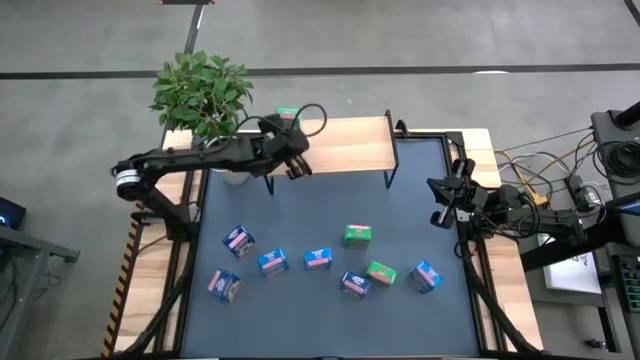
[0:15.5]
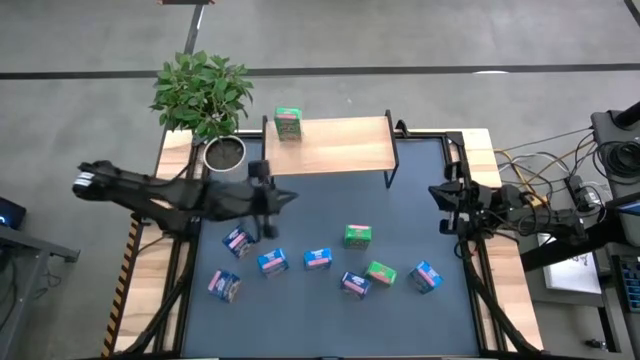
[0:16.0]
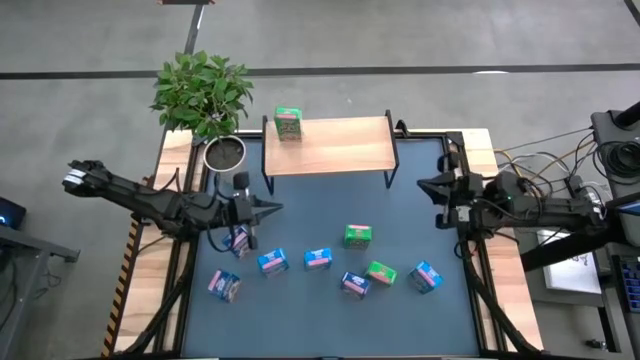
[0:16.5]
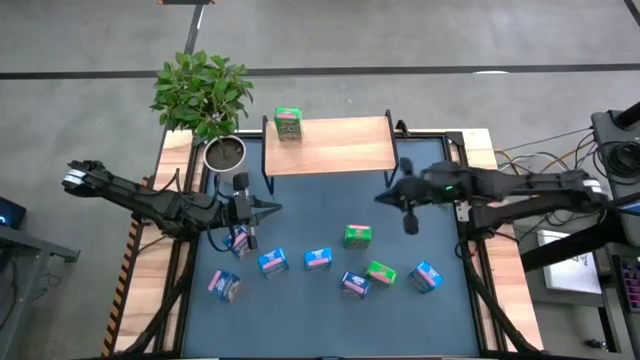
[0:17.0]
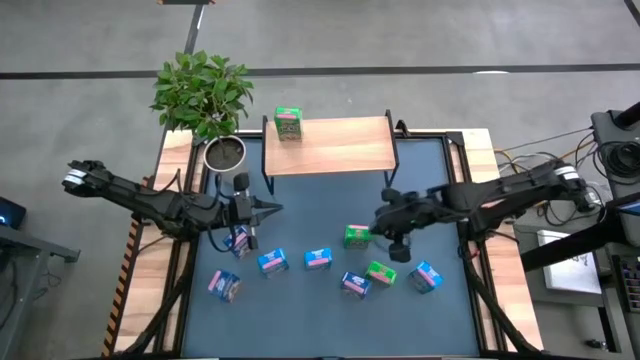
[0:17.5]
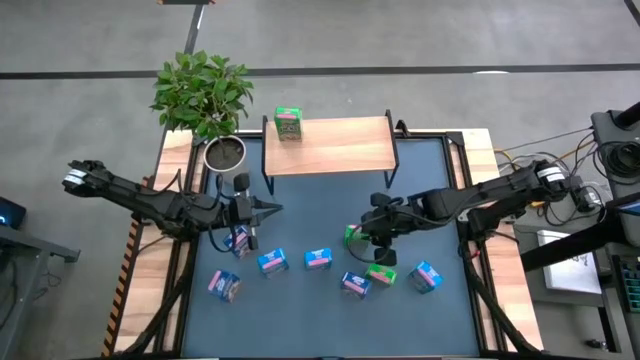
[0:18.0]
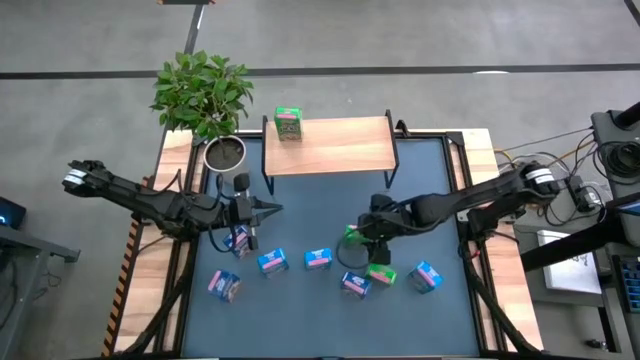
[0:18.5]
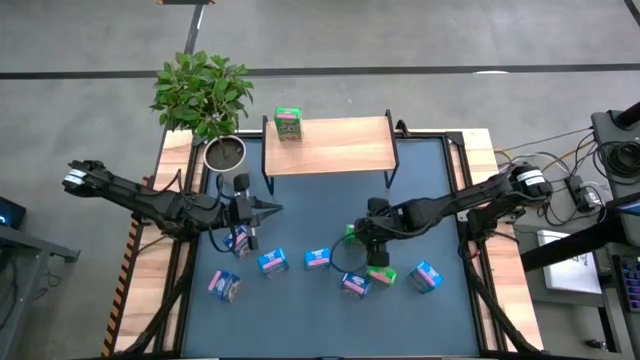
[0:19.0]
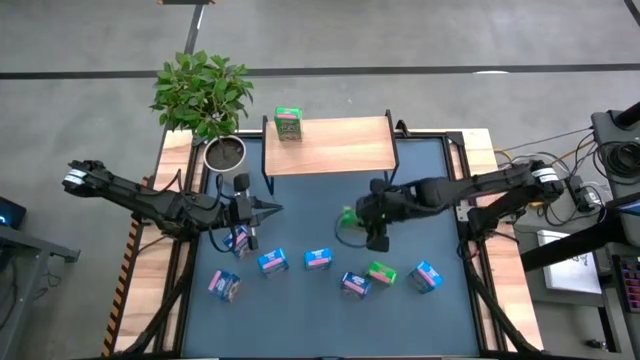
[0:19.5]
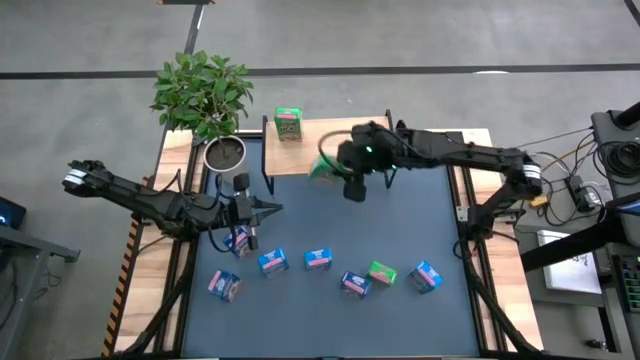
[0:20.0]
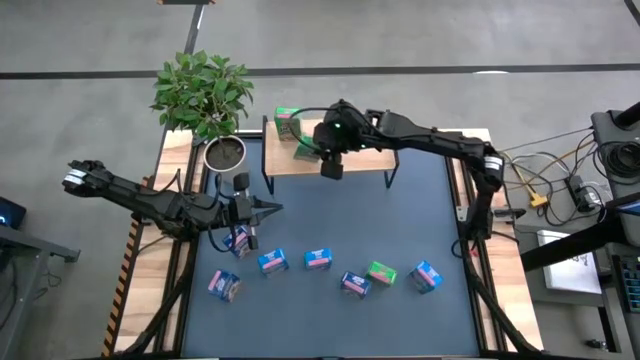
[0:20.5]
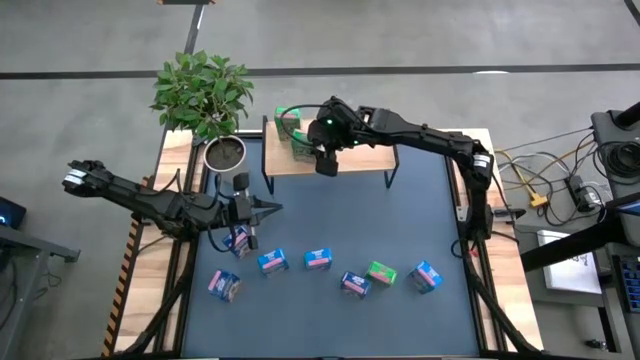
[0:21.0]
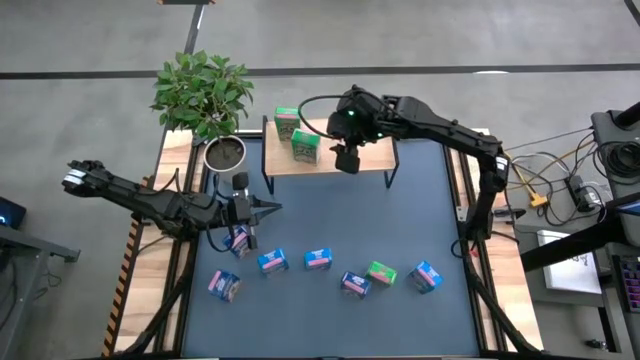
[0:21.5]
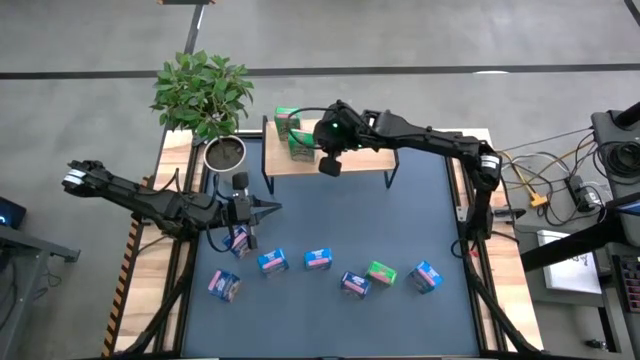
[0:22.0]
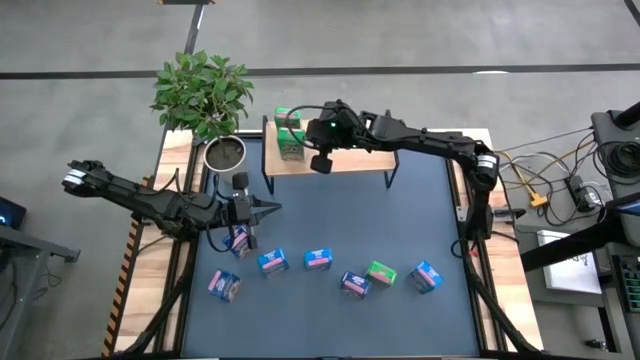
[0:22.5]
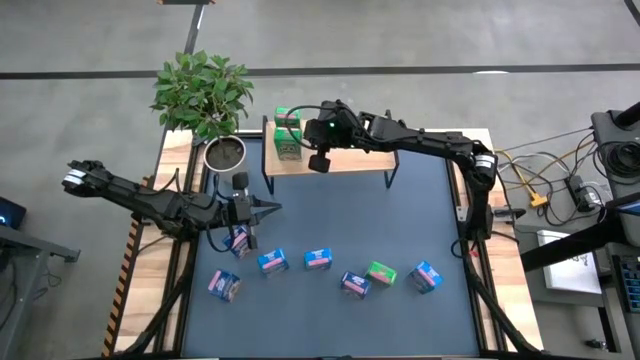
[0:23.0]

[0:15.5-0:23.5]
Task: Stack cereal on shelf
Put the top green cereal box on the shelf

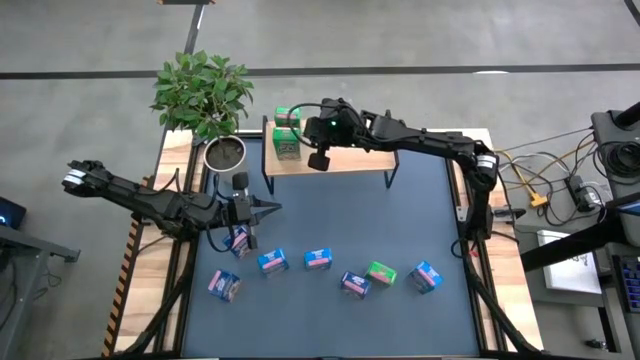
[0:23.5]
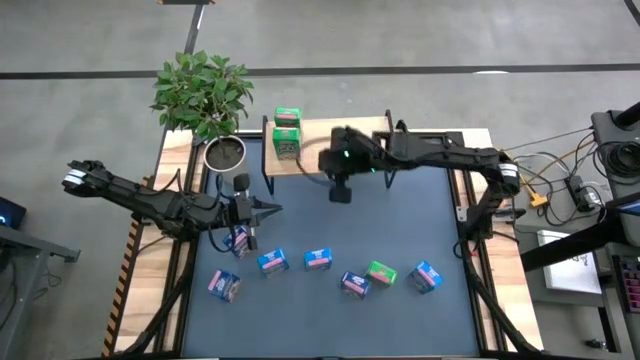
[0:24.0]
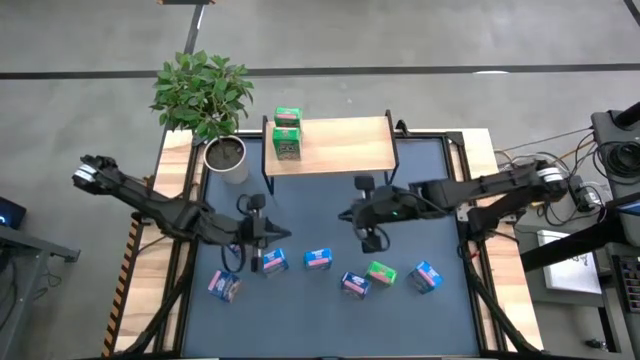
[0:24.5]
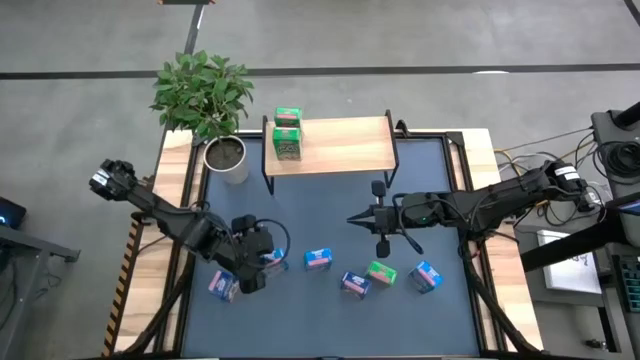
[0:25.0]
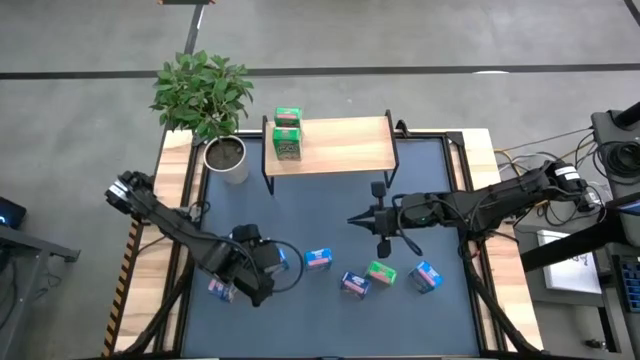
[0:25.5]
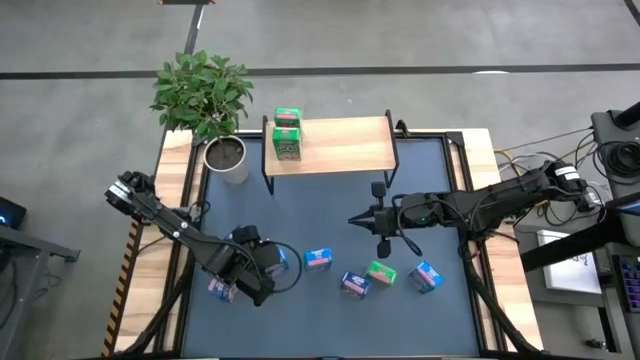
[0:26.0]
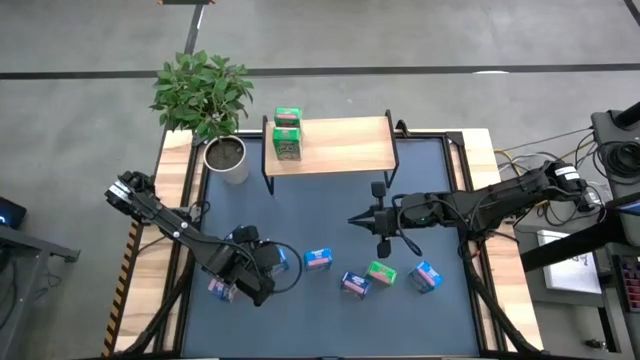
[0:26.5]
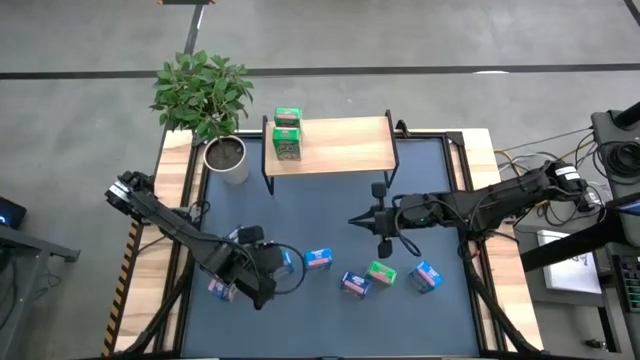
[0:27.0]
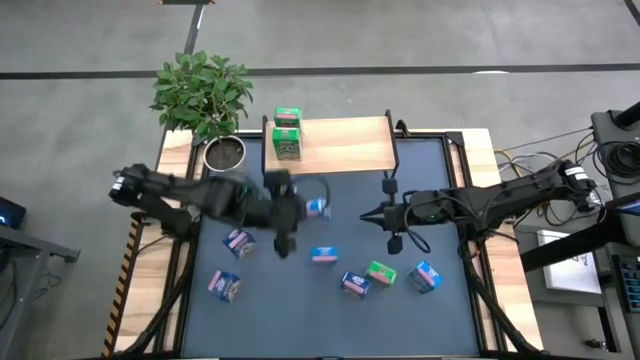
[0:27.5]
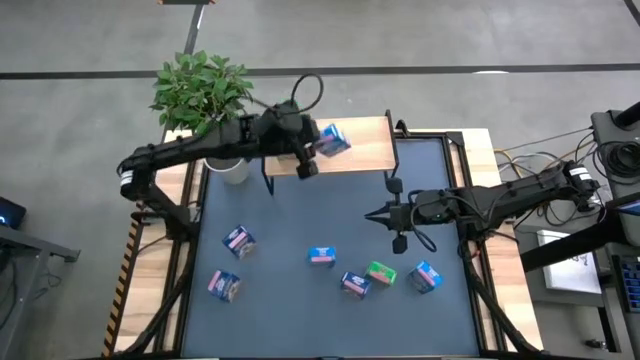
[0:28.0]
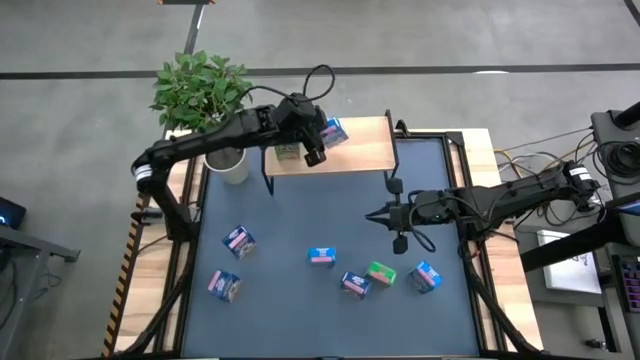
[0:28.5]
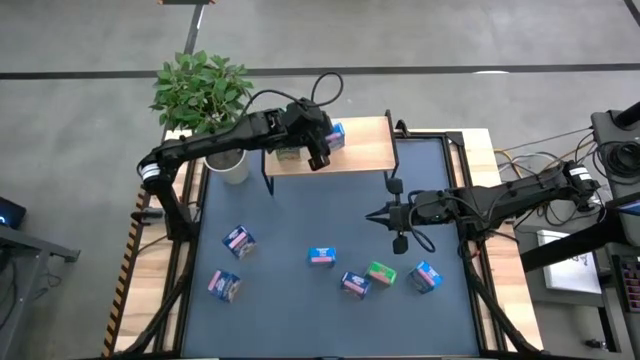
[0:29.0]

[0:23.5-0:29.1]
Put the left light blue cereal box on the shelf

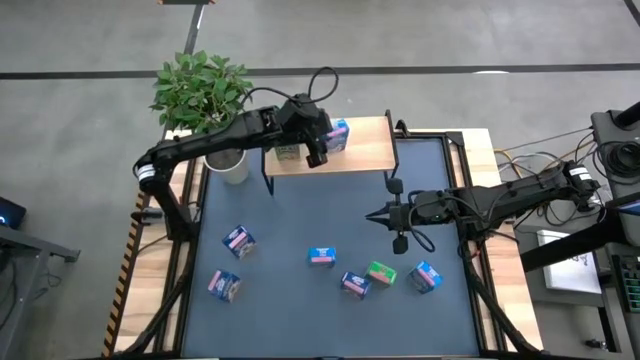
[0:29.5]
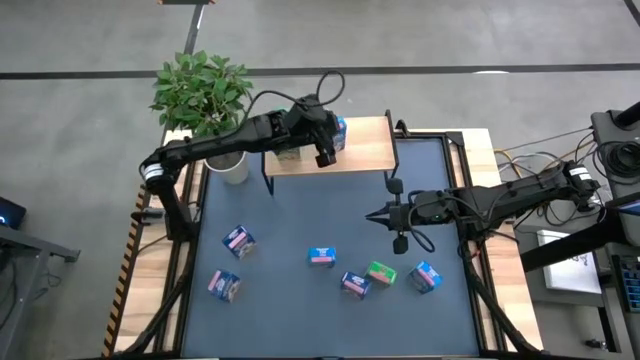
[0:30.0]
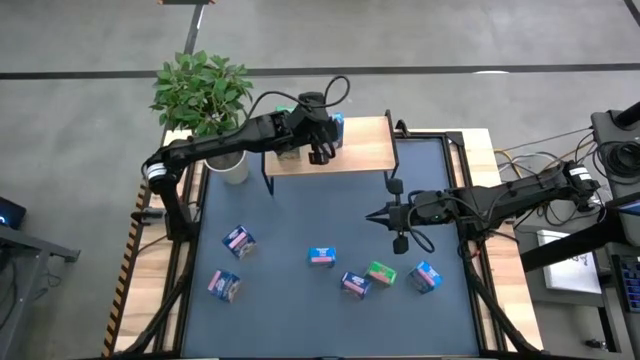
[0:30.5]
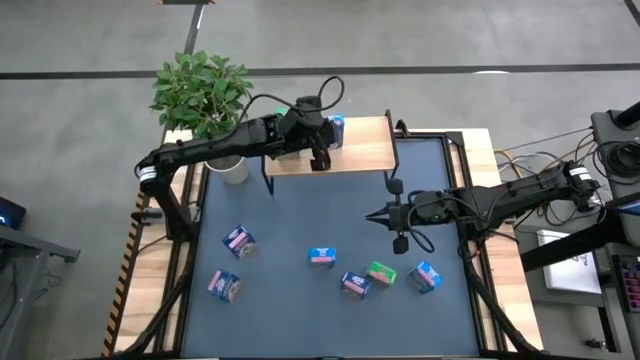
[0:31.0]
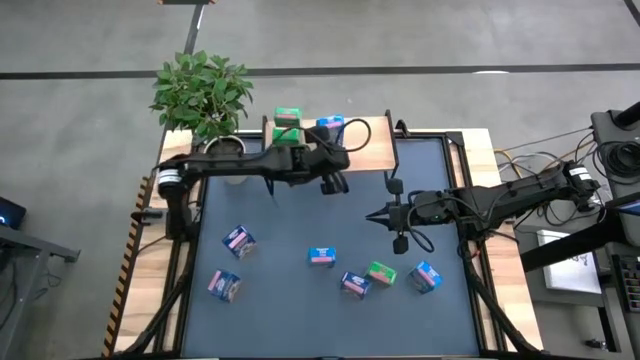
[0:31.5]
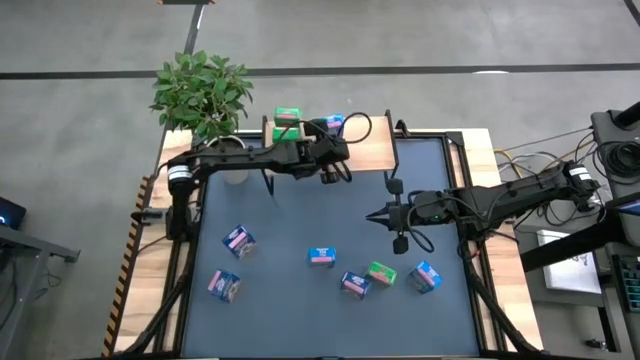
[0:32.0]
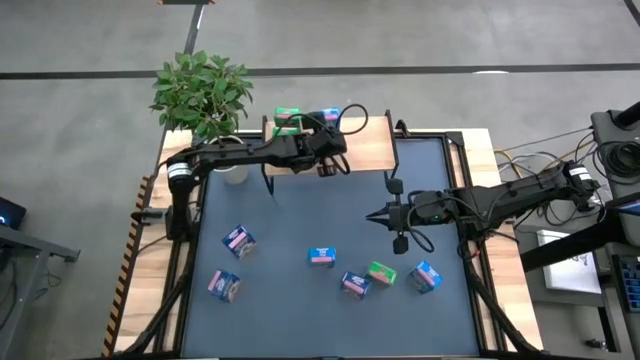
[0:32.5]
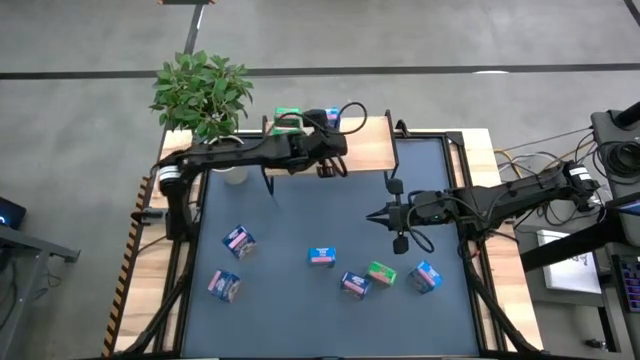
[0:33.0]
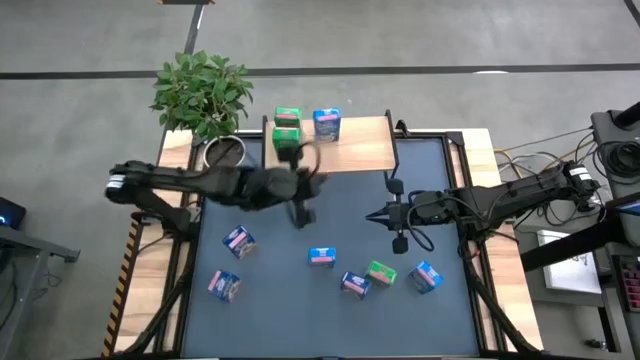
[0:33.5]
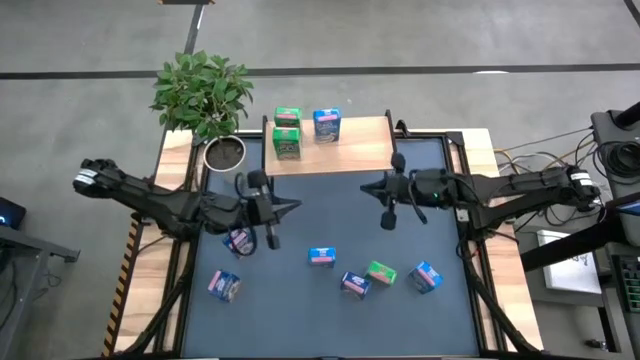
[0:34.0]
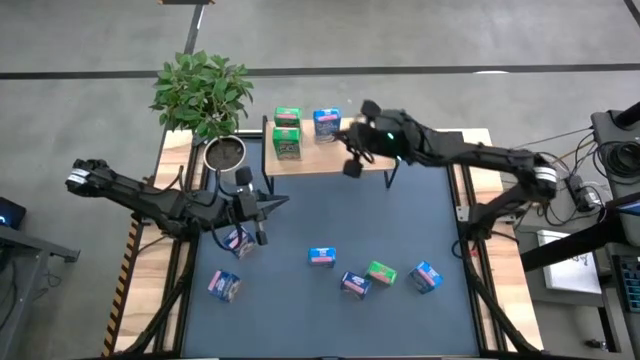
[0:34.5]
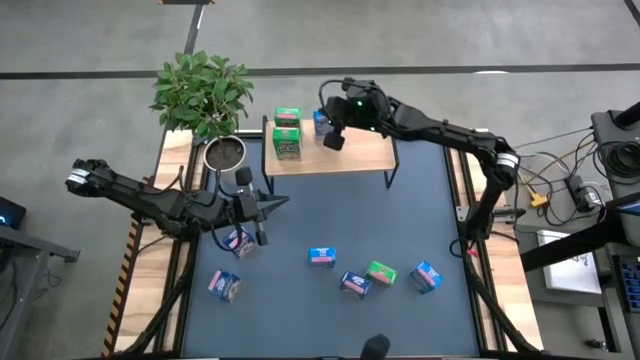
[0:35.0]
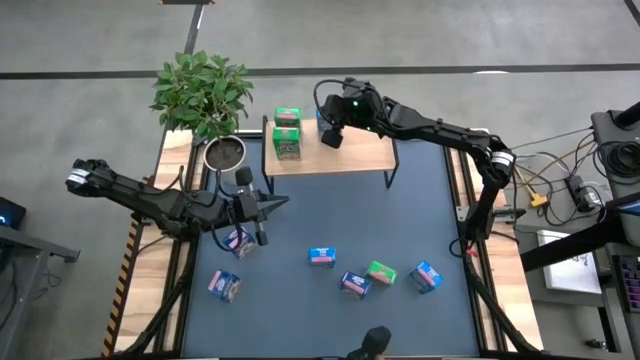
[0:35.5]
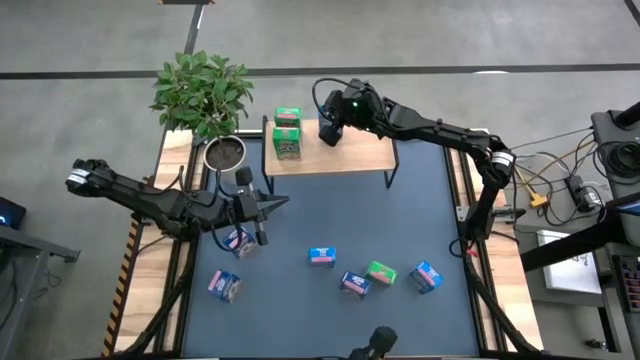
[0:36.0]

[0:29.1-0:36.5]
Adjust the light blue cereal box on the shelf
